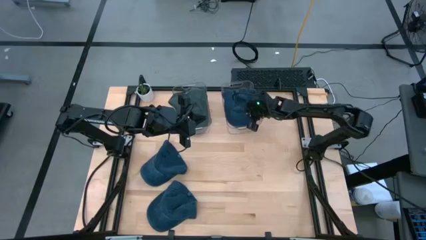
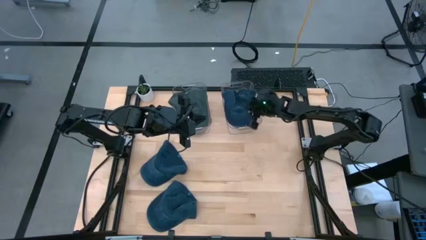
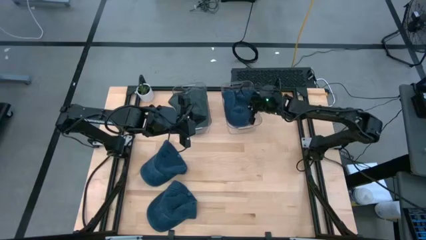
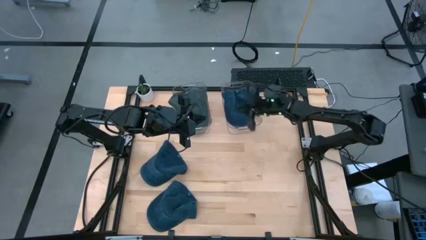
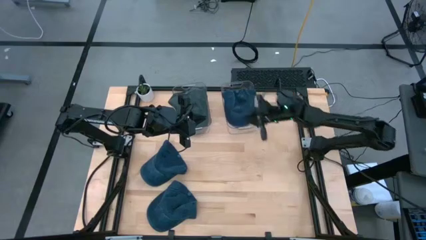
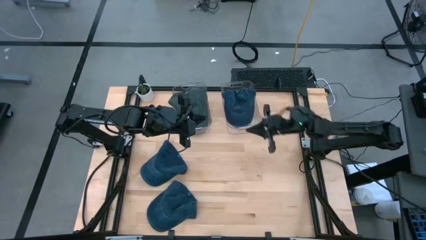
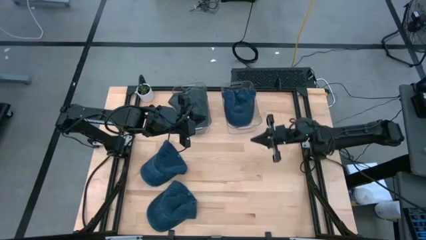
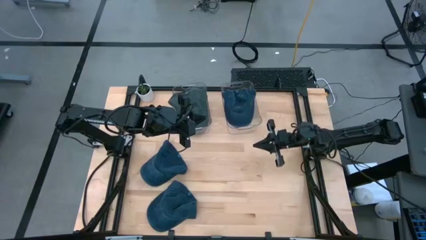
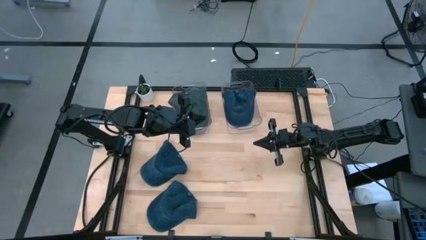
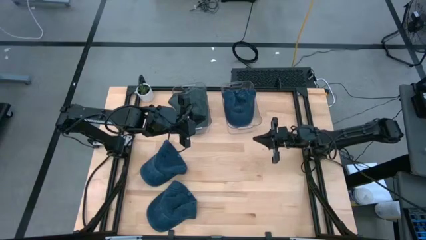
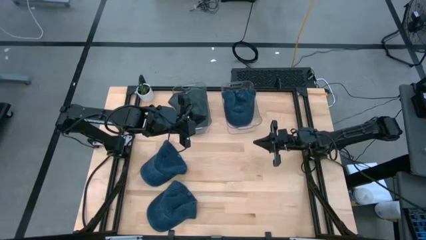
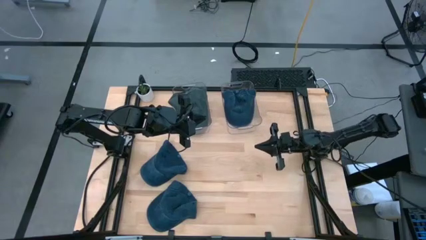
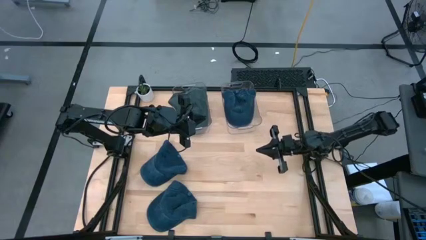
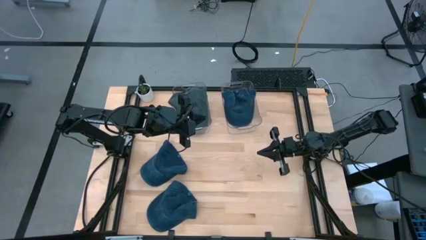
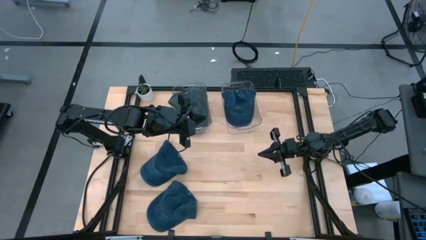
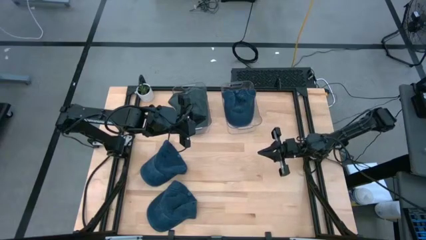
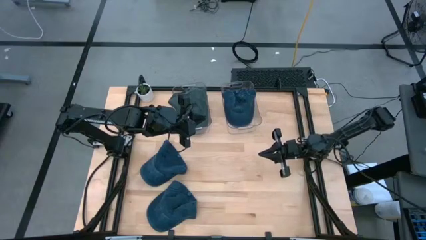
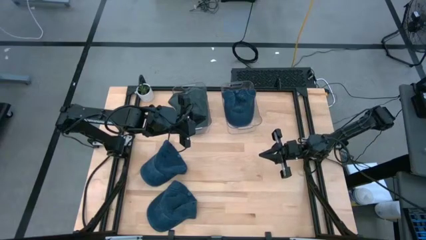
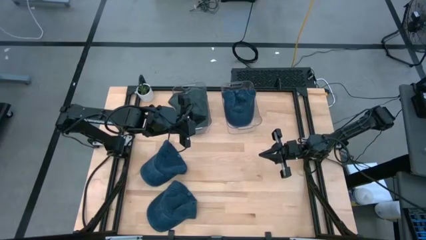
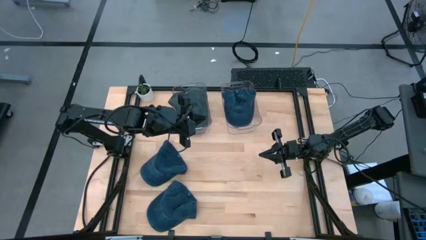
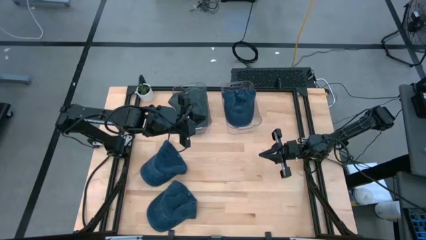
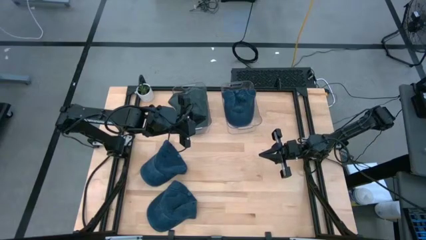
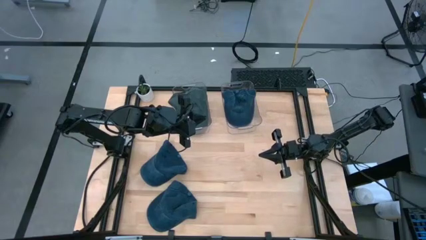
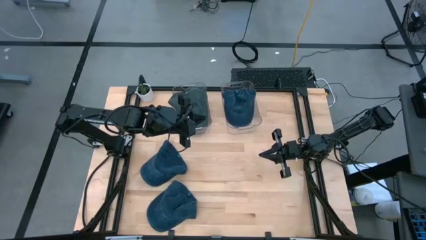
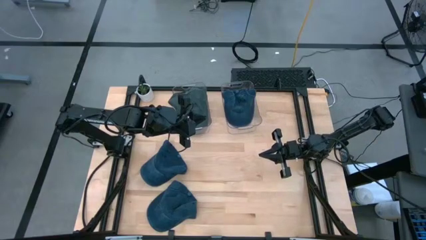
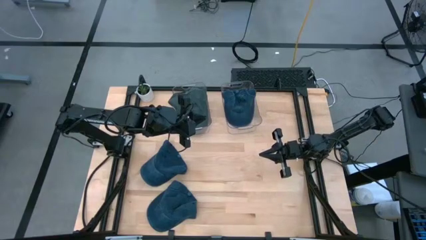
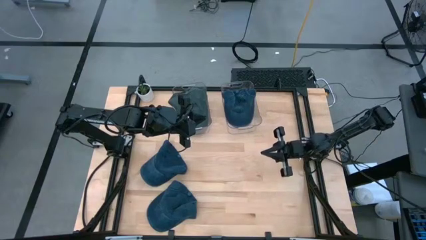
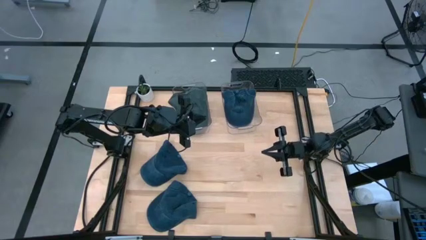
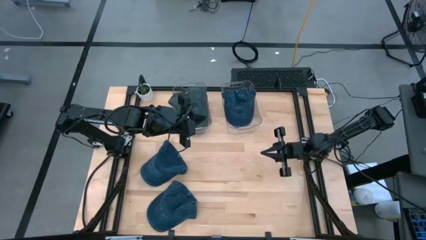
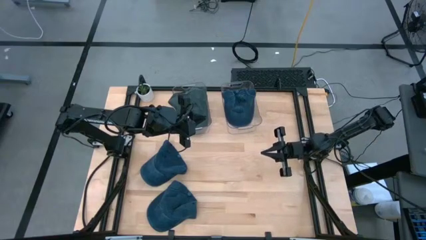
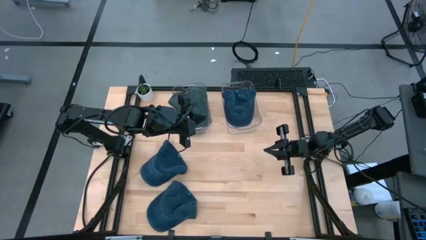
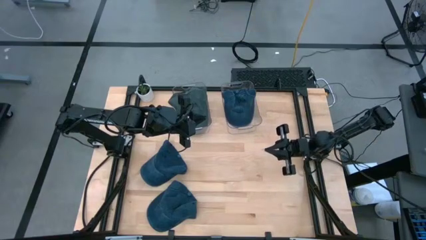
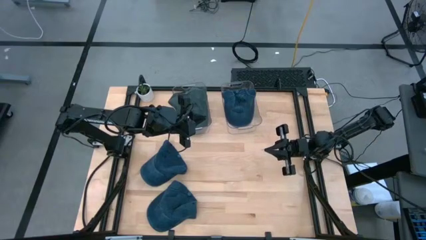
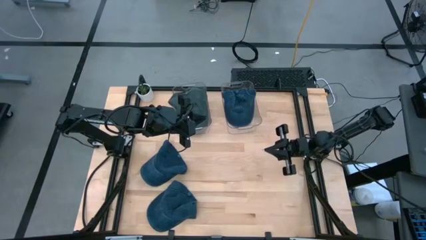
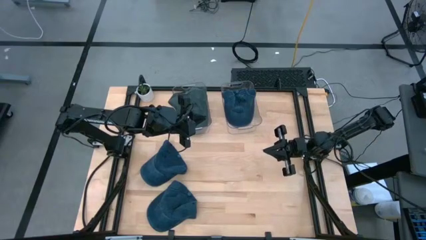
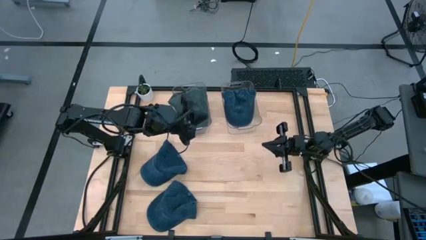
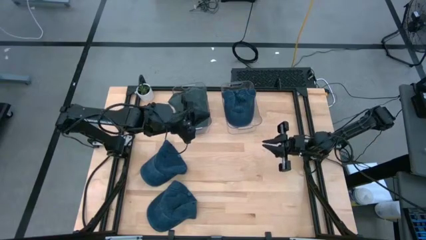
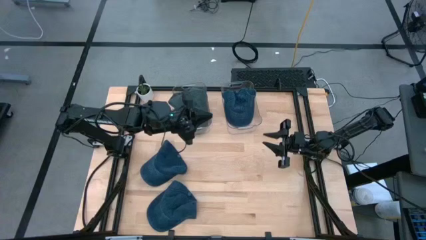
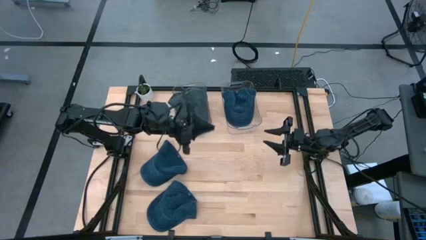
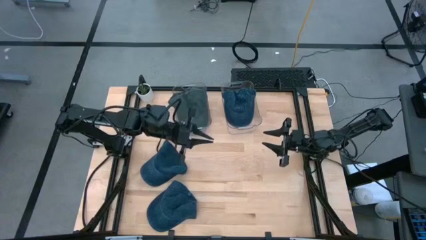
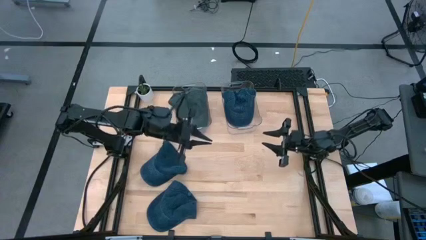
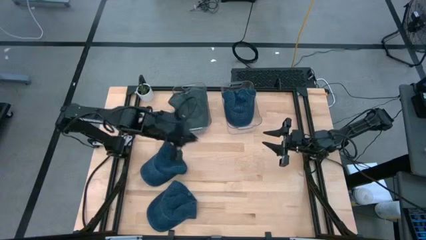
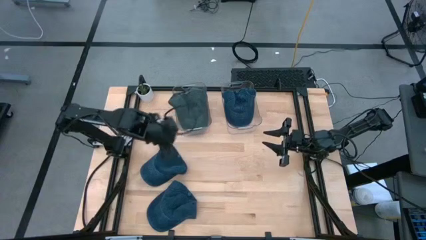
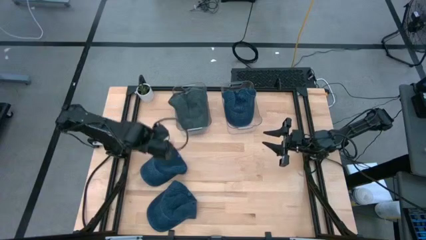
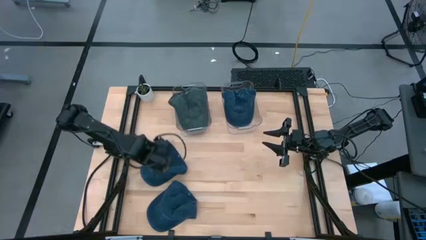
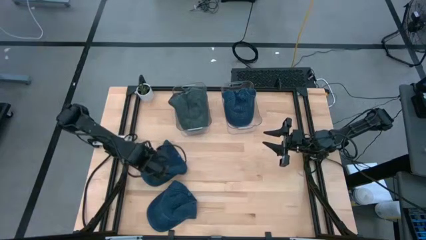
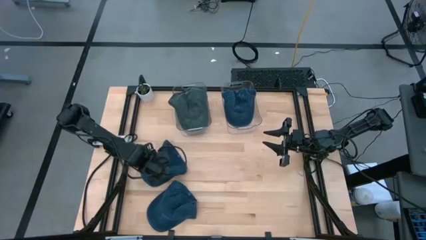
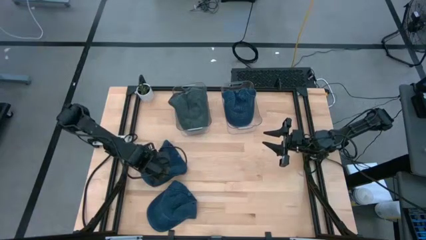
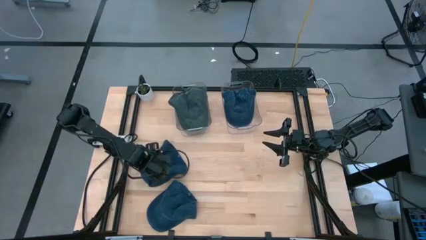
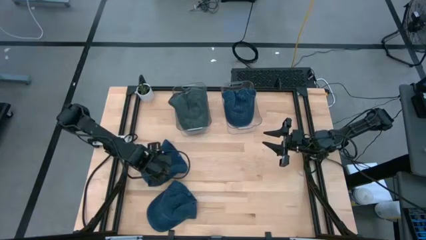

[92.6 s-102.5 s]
Task: Pick & Place hat
Put the top blue cap into the right transparent bin
